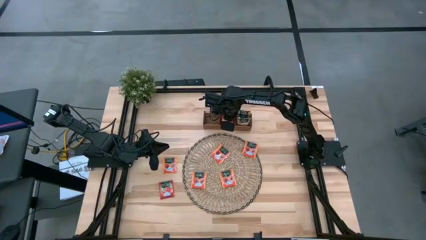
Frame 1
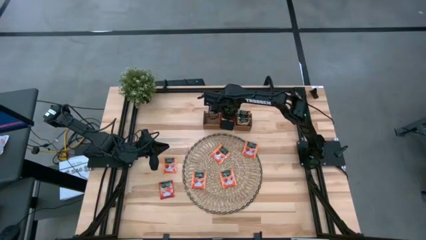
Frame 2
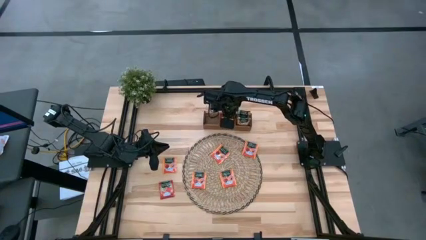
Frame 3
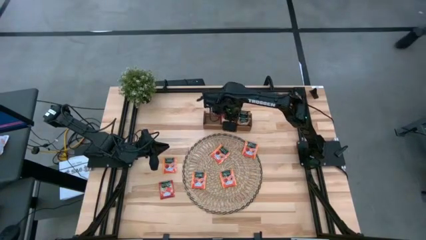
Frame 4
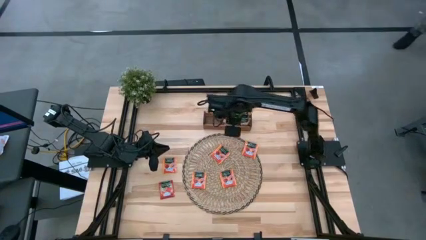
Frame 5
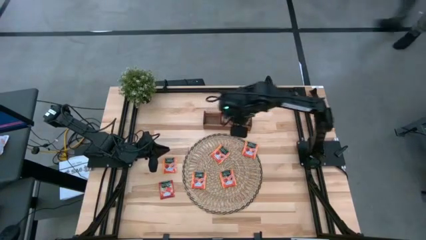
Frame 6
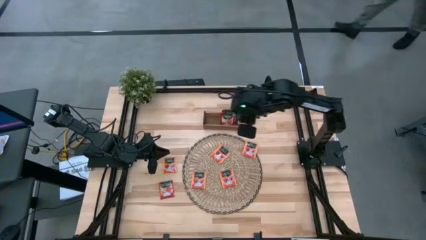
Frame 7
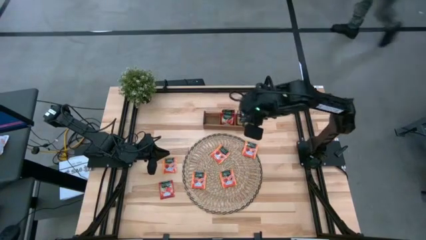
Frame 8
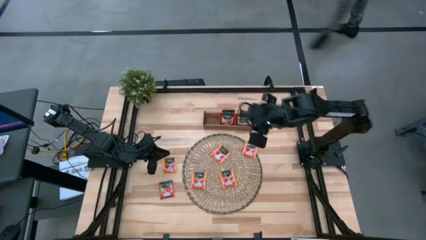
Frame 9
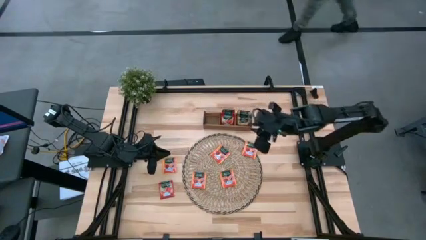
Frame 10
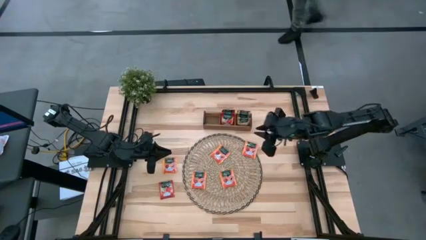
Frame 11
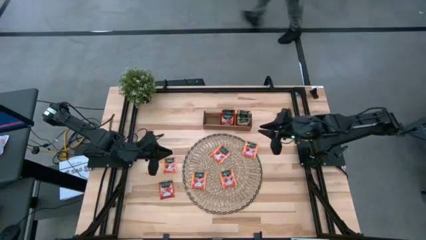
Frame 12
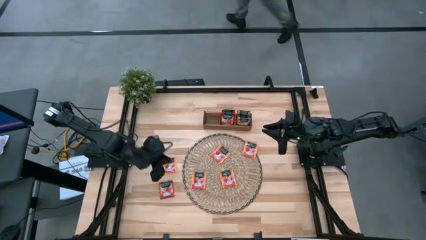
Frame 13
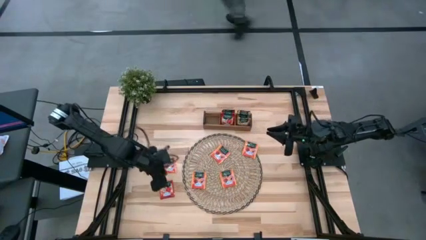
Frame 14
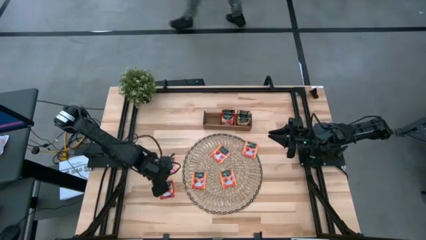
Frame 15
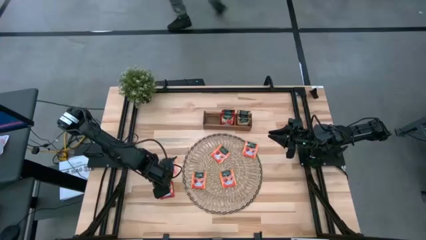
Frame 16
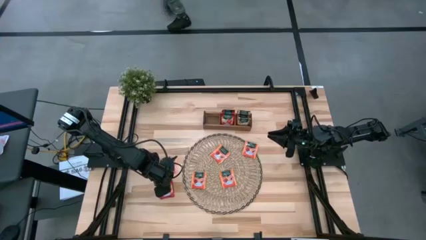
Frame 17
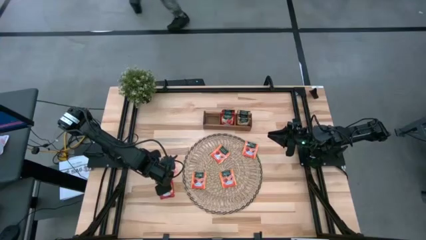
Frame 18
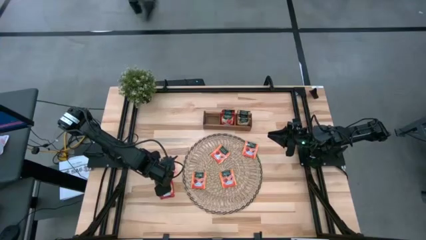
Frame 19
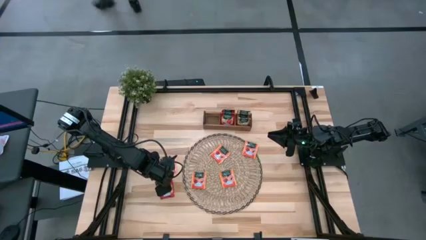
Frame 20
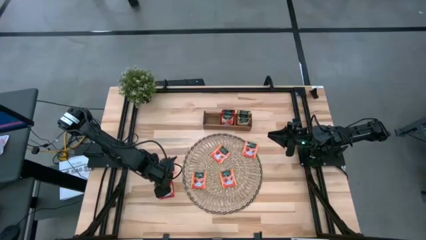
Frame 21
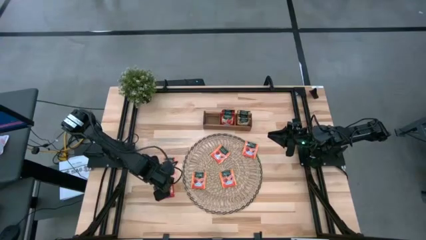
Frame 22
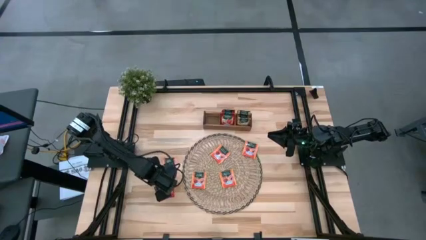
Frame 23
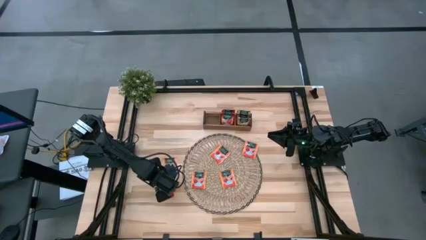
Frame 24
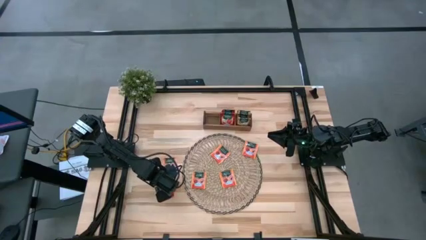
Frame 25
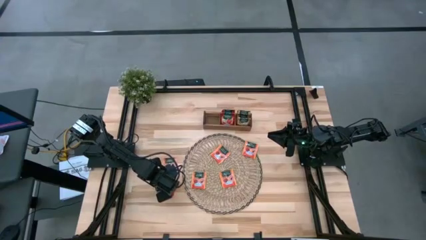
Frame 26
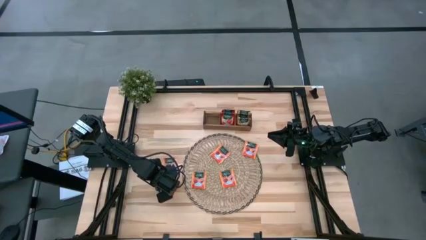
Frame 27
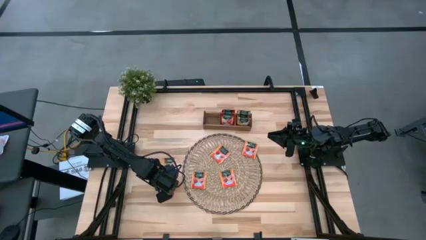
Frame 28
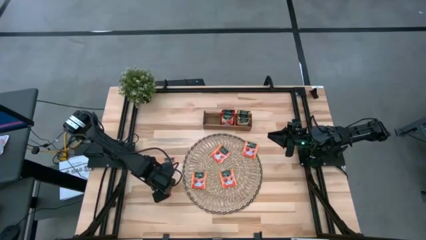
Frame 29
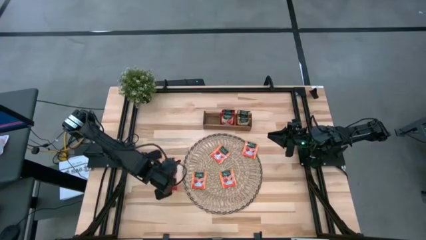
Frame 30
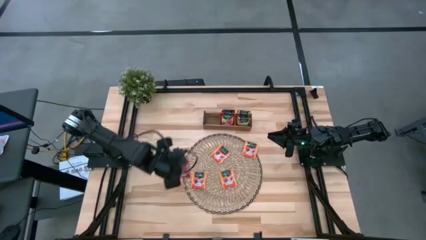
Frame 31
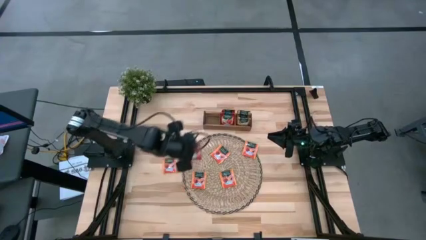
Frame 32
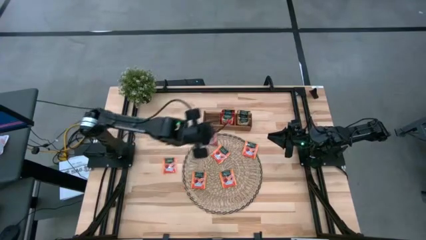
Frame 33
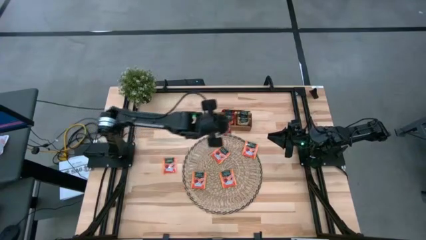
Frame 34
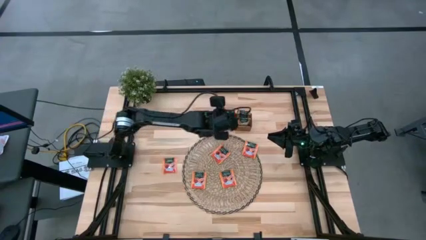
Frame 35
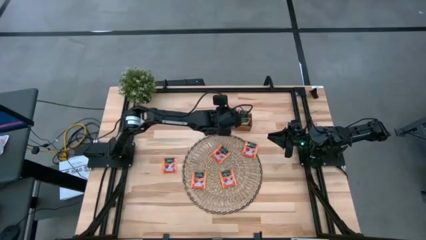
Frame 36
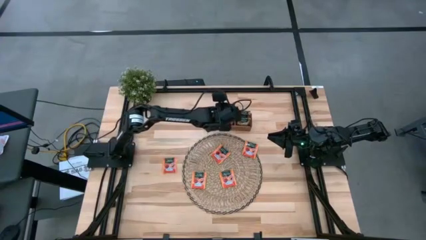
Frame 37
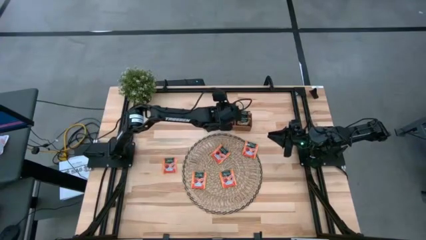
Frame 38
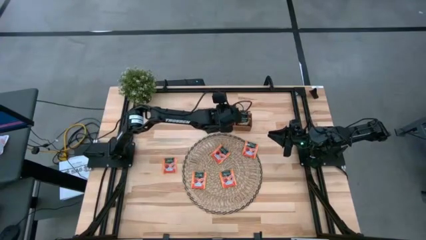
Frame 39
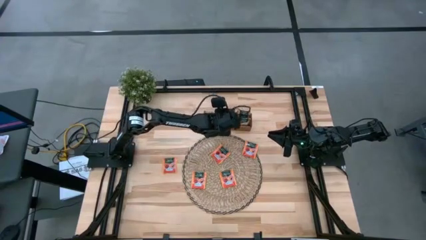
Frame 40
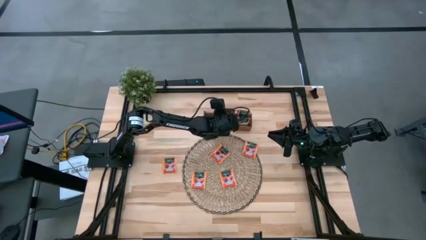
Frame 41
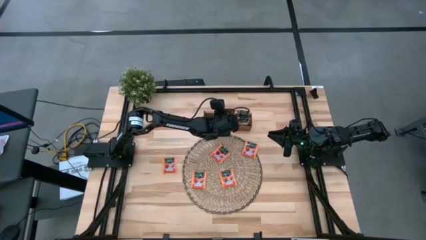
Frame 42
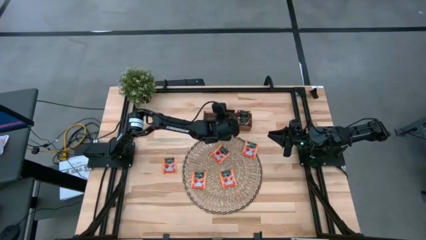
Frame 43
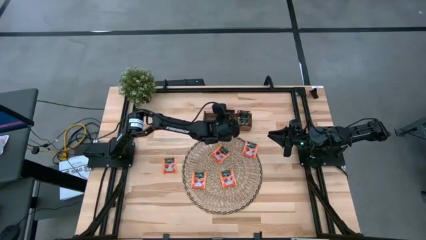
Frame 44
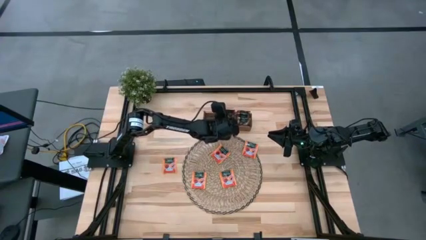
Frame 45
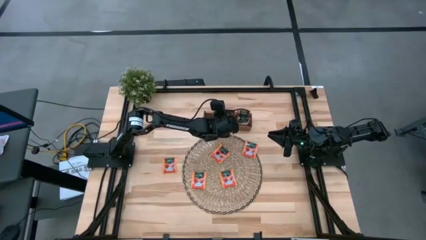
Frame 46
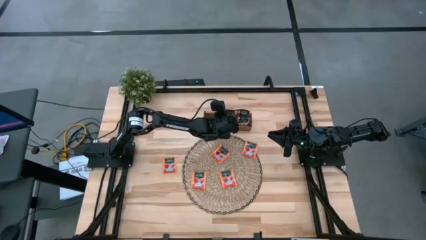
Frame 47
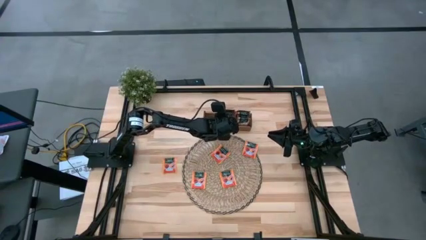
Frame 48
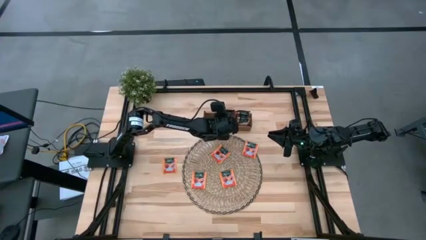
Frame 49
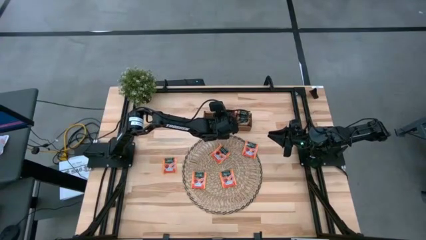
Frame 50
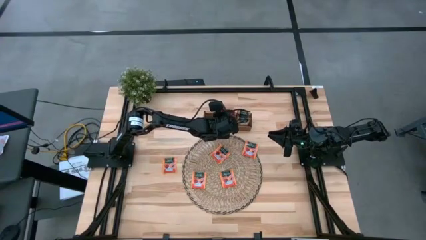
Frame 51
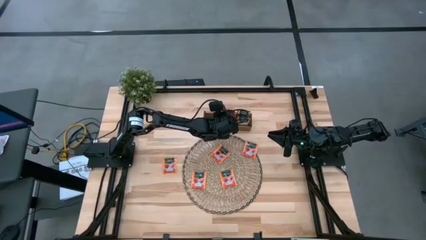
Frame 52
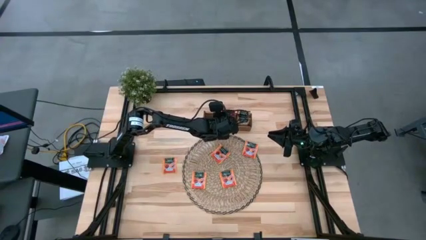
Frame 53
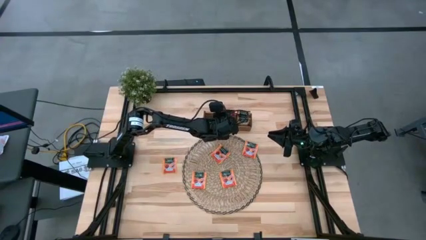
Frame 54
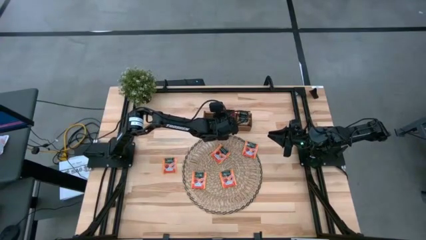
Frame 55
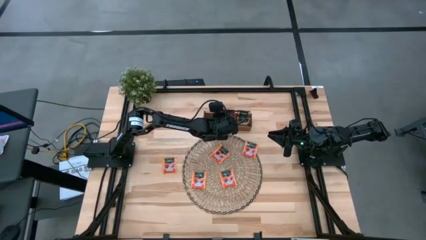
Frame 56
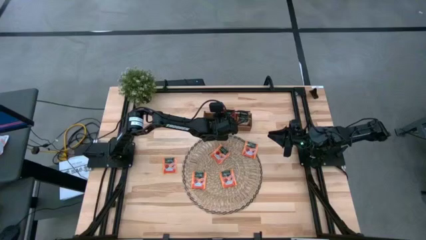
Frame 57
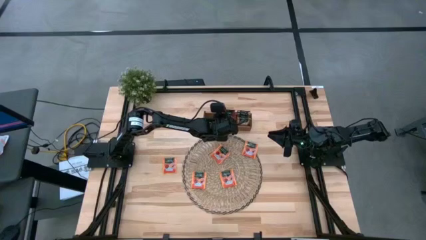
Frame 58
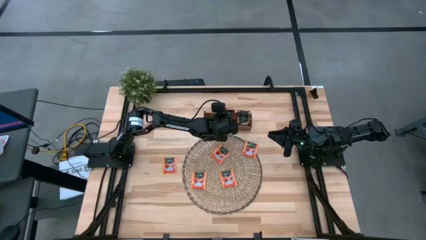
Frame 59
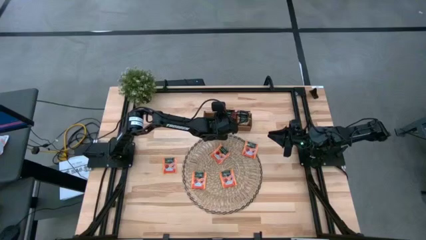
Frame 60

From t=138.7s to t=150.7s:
Task: Pick & Place Tea
Put the red tea bag into the middle section of the wooden organizer
